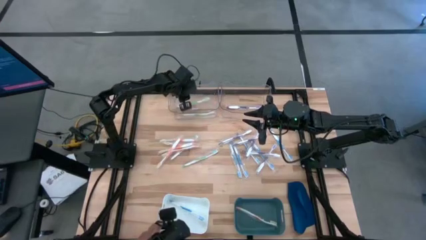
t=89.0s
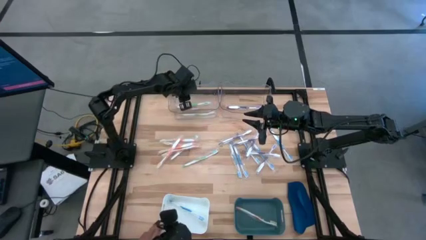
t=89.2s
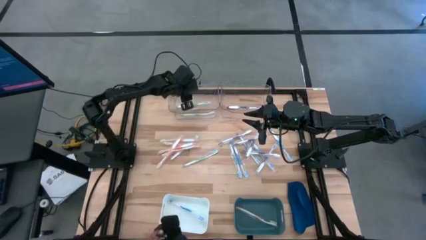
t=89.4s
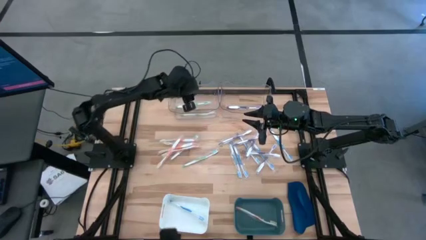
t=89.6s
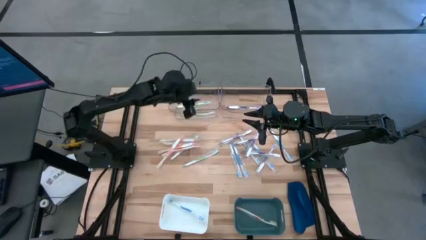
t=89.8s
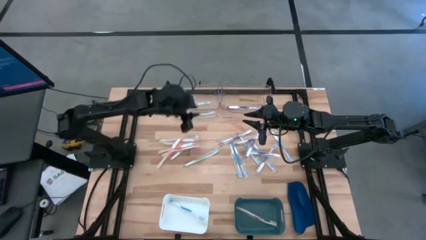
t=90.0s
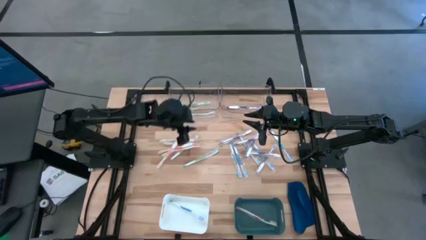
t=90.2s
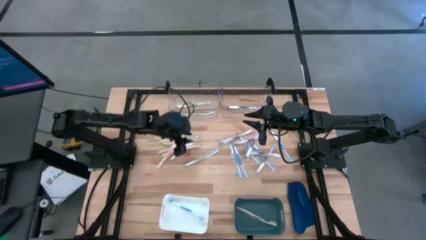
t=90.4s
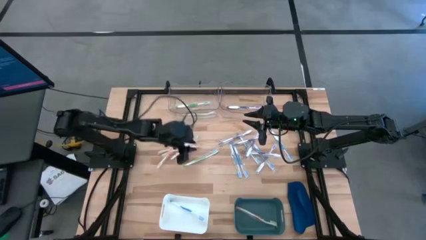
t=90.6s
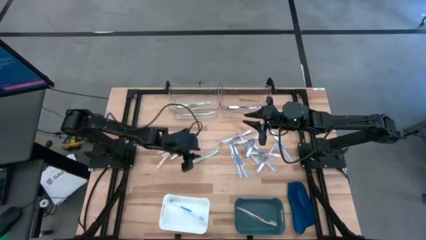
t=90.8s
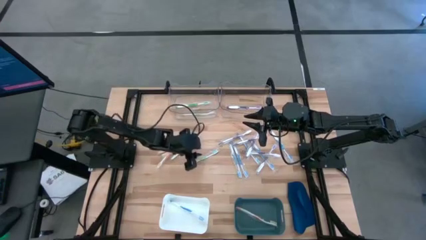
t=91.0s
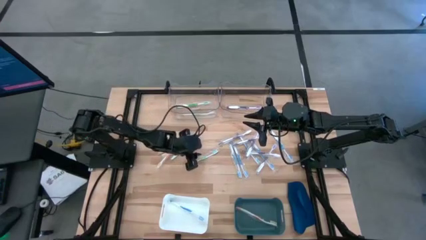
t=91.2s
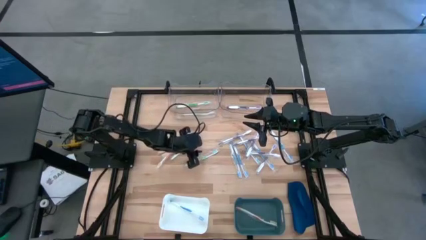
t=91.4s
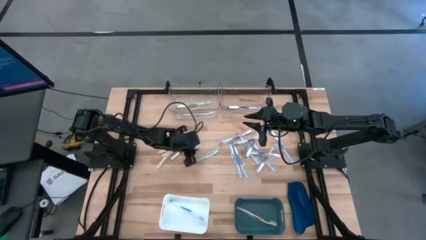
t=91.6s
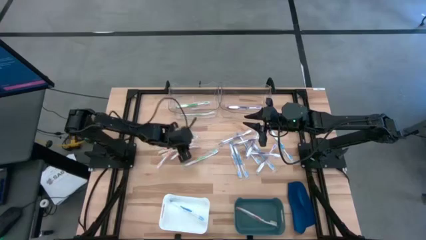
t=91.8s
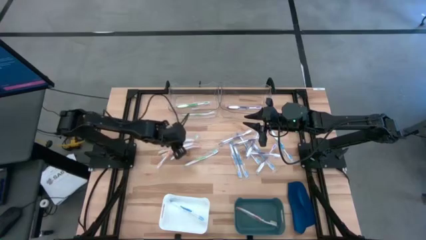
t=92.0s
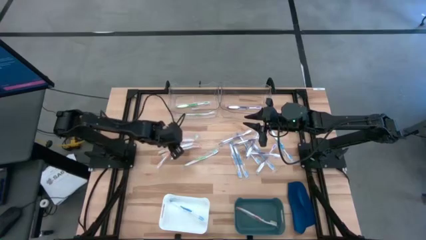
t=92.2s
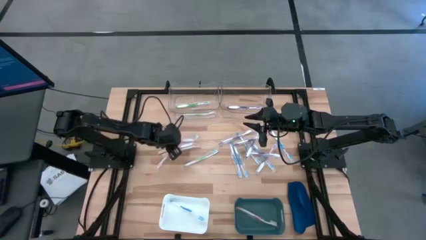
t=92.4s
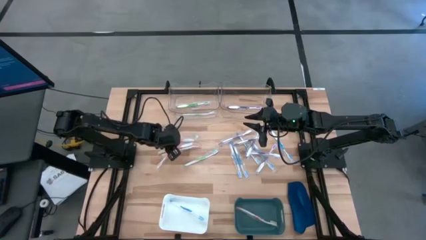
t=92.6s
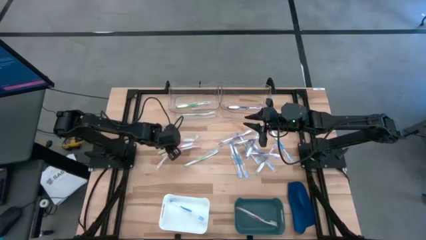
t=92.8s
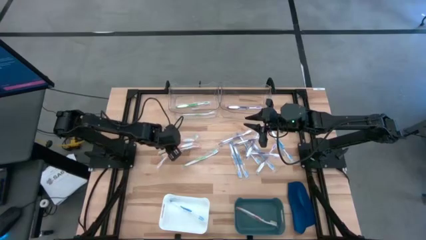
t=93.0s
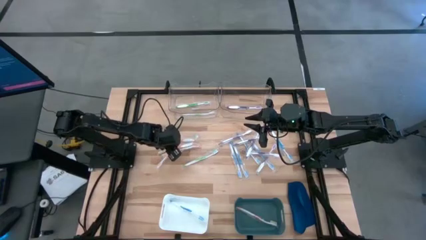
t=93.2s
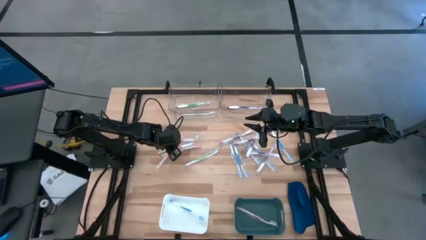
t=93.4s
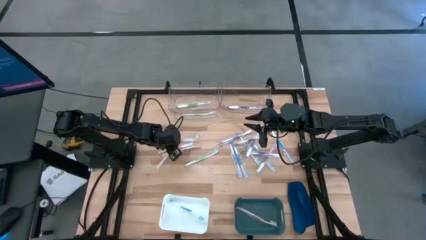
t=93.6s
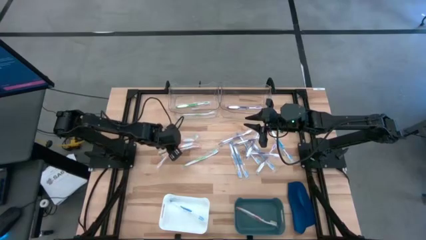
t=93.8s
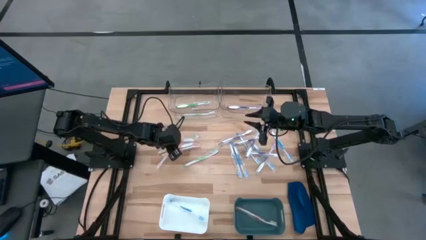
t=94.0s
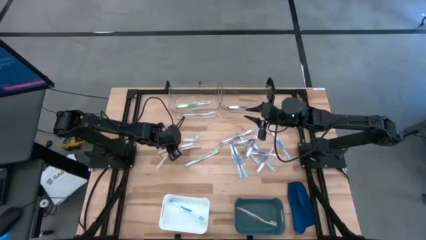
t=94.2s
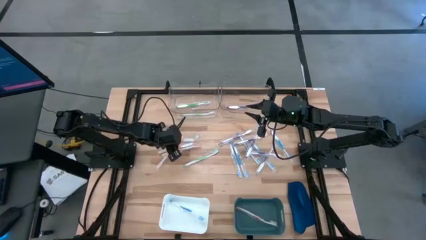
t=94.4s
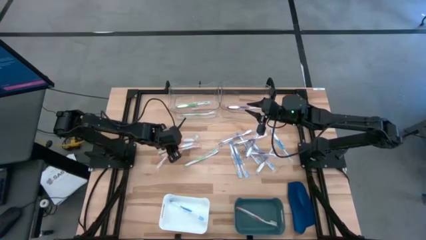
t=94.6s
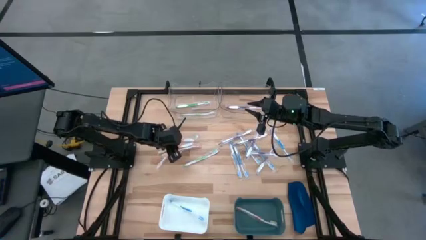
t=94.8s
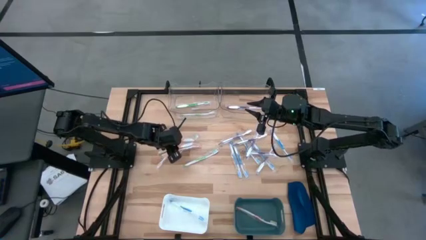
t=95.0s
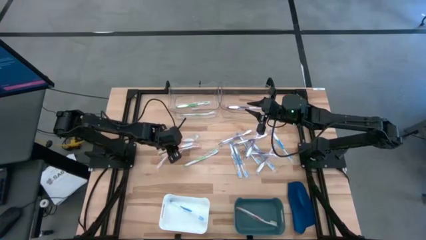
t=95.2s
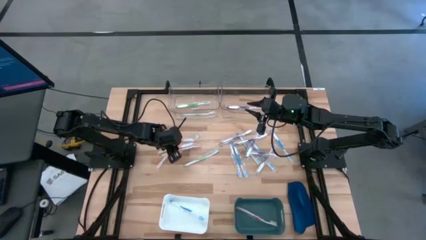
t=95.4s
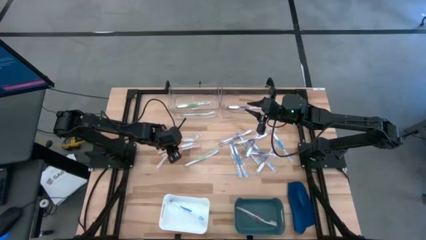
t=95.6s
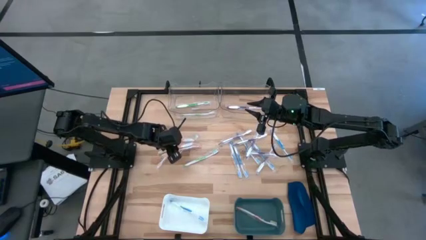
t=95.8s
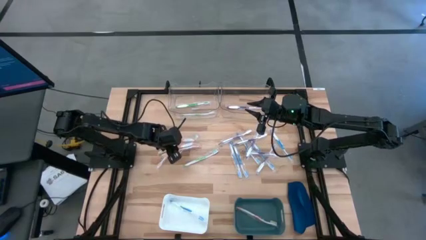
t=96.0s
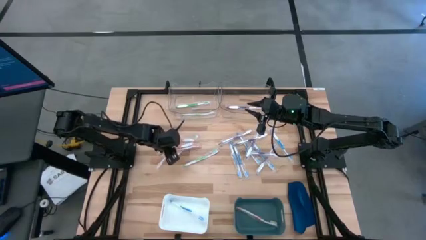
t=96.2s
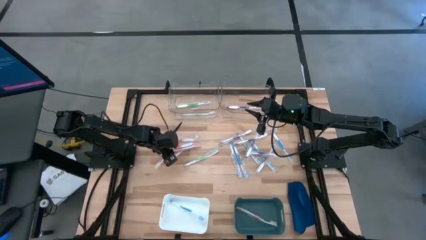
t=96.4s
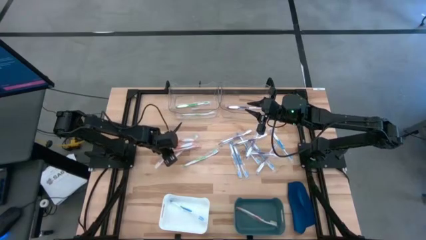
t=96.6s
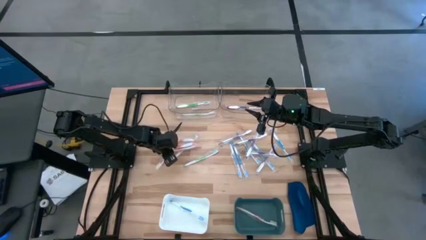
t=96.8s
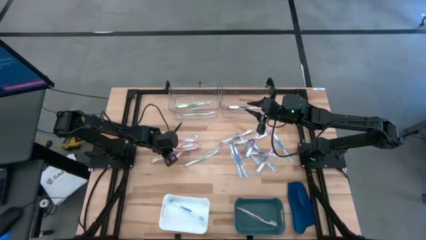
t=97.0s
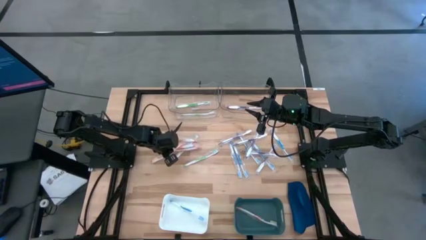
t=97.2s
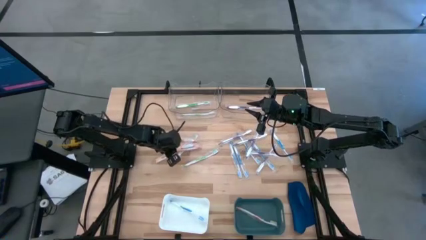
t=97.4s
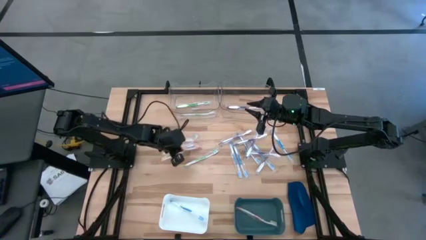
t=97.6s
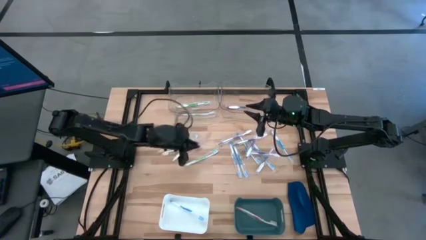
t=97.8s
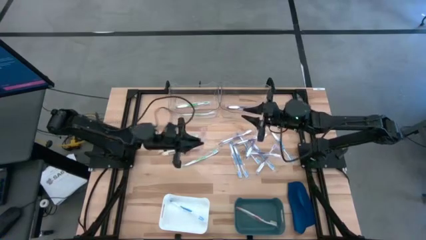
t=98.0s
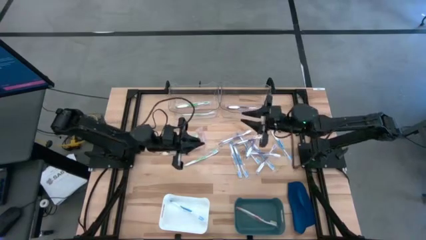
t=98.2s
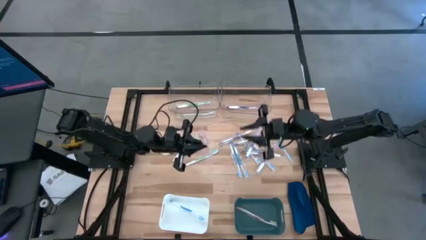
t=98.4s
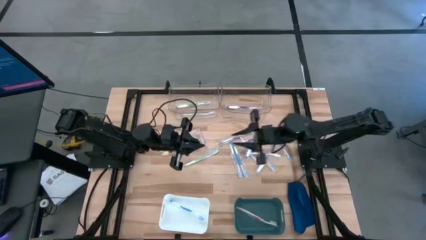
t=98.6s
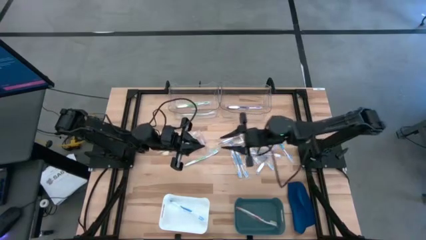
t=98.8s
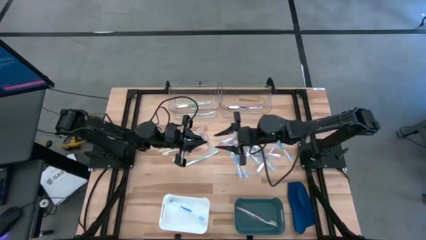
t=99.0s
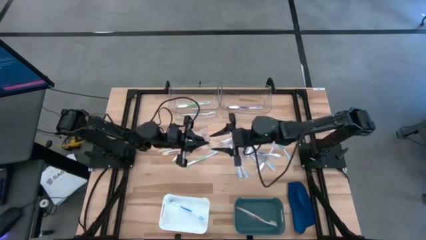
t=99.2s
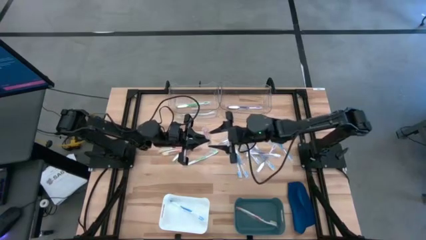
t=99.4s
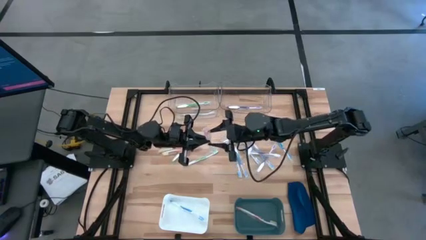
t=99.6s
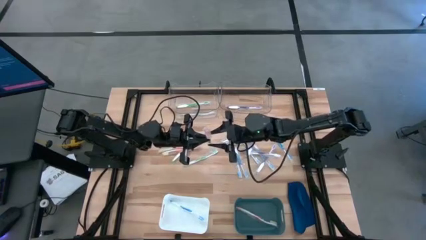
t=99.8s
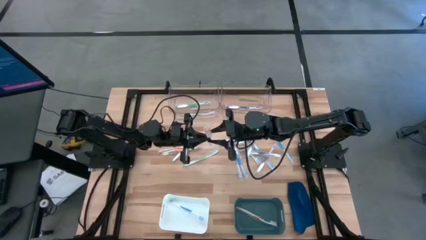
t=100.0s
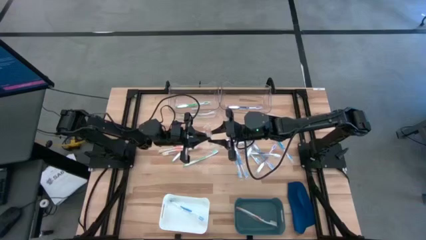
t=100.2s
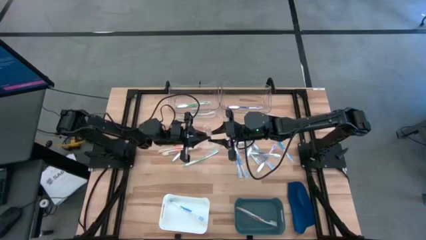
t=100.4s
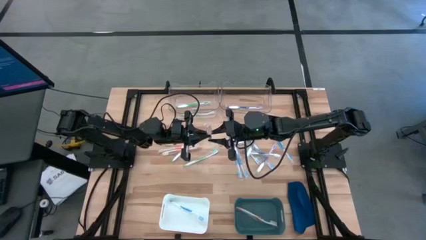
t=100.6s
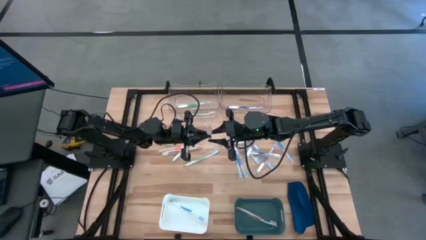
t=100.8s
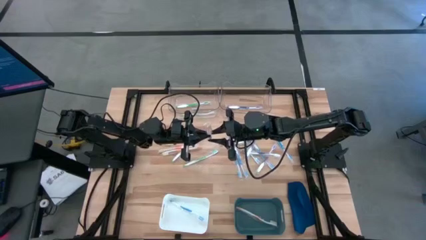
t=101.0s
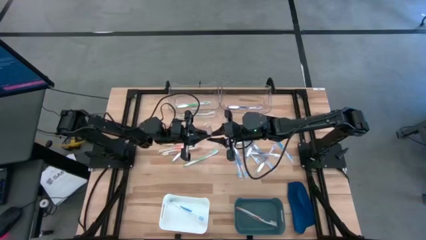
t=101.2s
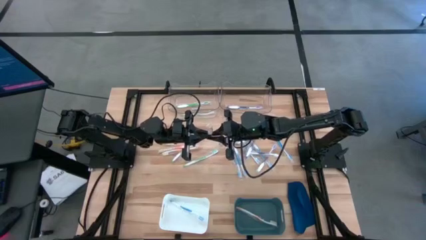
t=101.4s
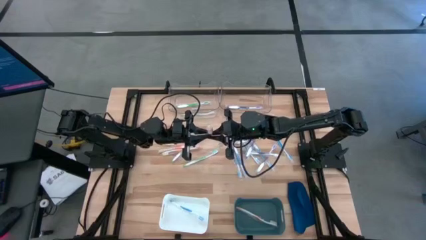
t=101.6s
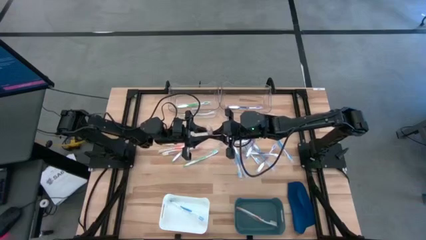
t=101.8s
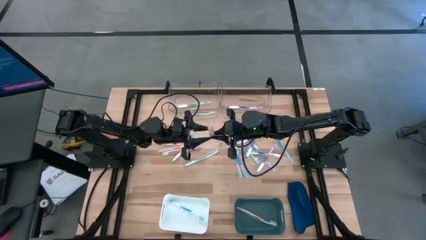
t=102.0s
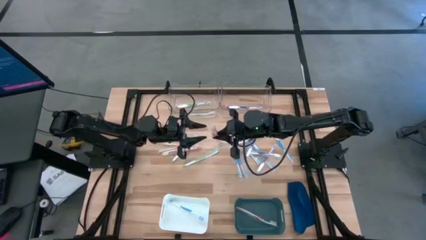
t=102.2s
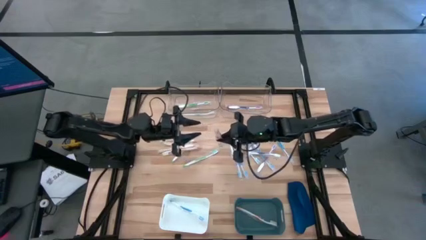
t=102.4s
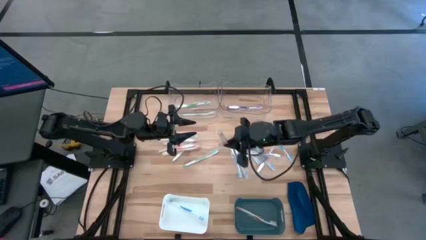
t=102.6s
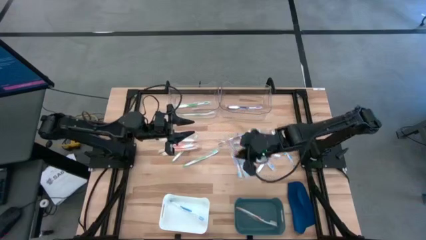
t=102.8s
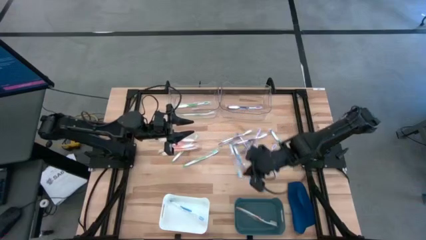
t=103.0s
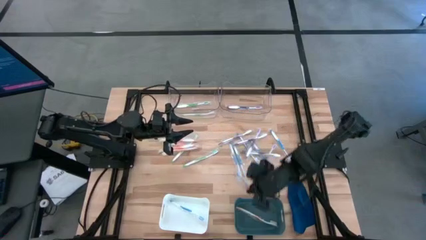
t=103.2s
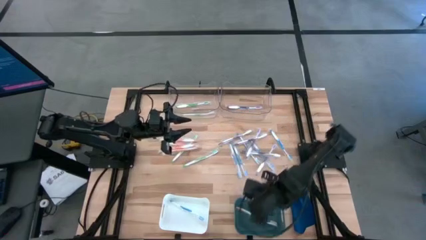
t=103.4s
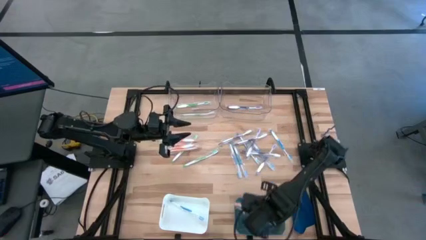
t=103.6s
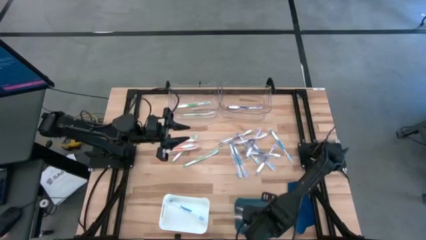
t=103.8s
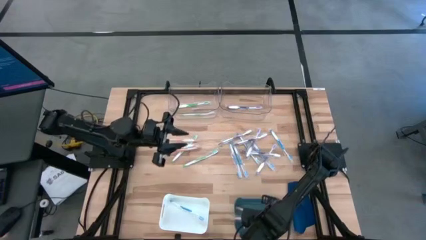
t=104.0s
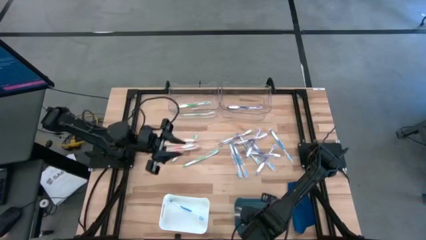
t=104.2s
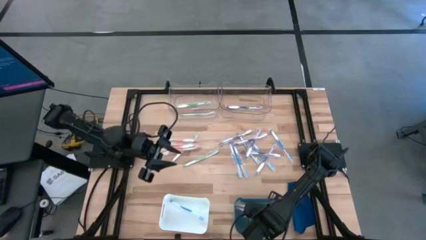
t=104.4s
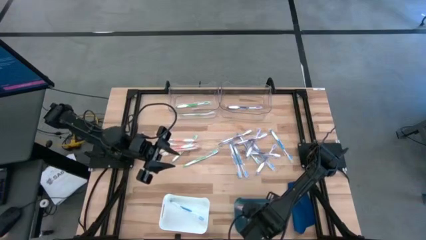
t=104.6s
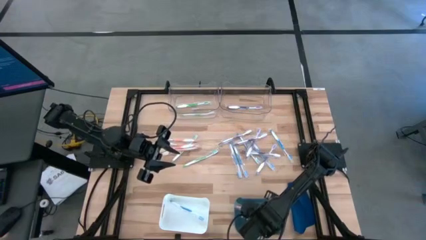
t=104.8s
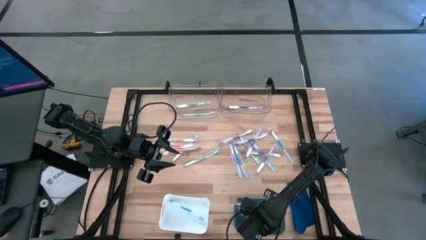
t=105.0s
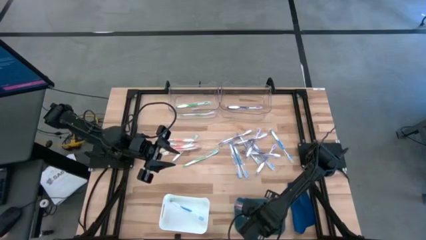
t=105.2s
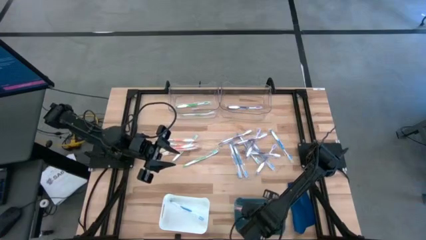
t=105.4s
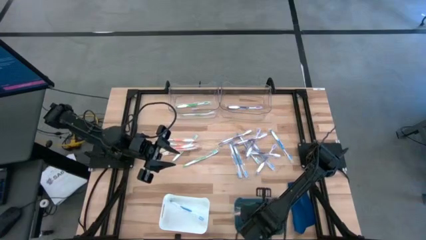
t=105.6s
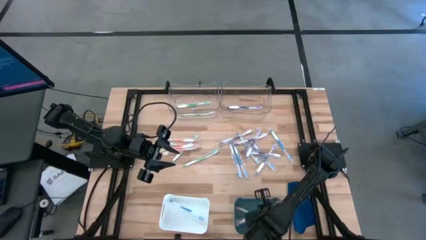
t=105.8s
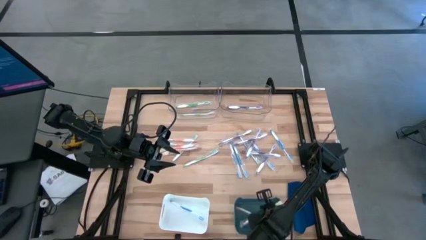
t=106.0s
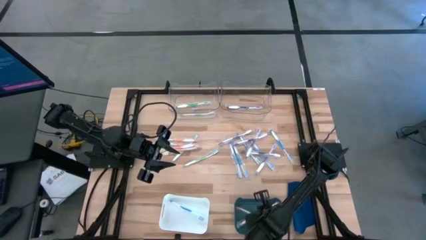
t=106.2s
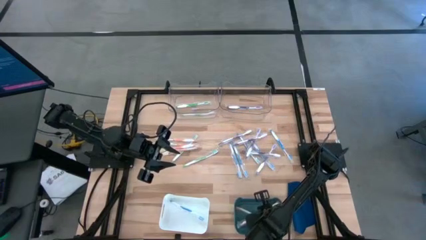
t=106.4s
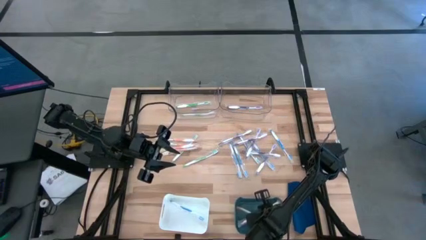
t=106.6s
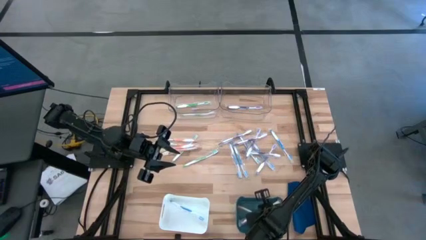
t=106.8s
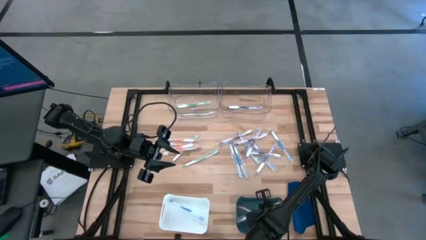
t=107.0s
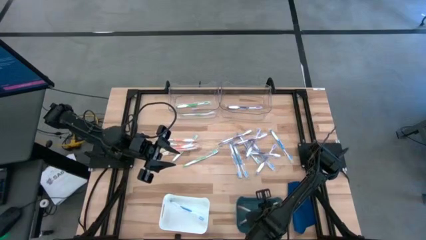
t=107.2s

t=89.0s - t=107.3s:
Task: Pick & Place Toothbrushes
Put the orange toothbrush into the green bin
